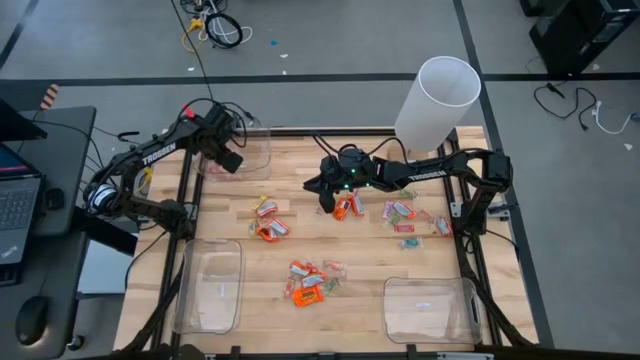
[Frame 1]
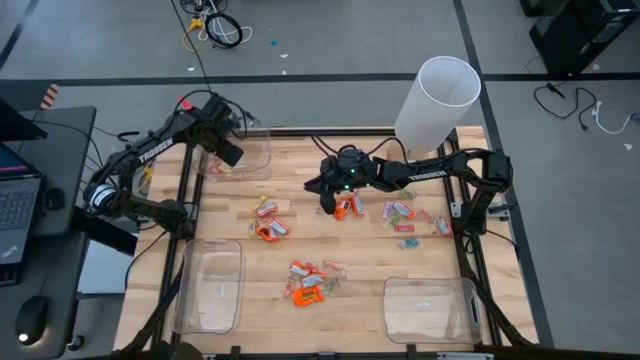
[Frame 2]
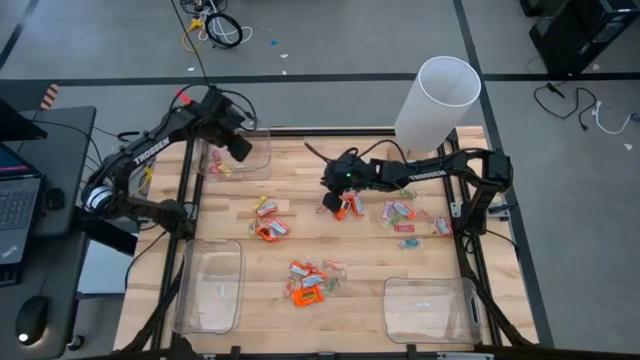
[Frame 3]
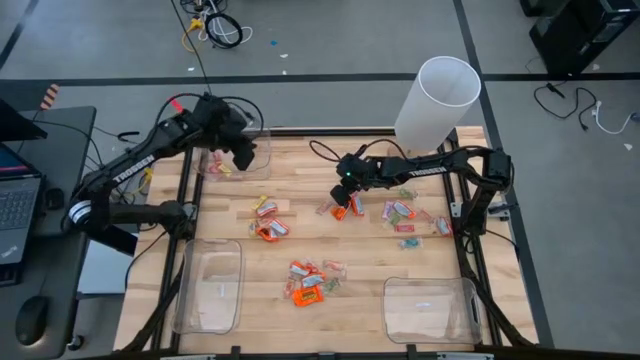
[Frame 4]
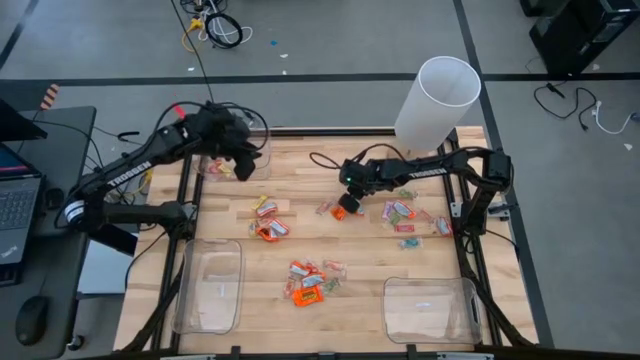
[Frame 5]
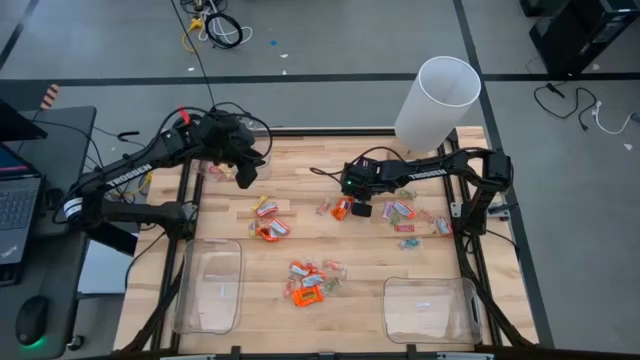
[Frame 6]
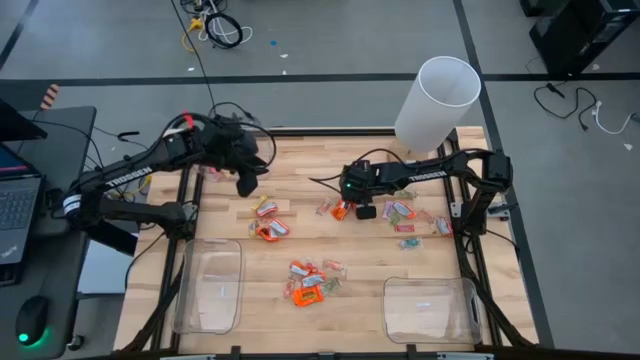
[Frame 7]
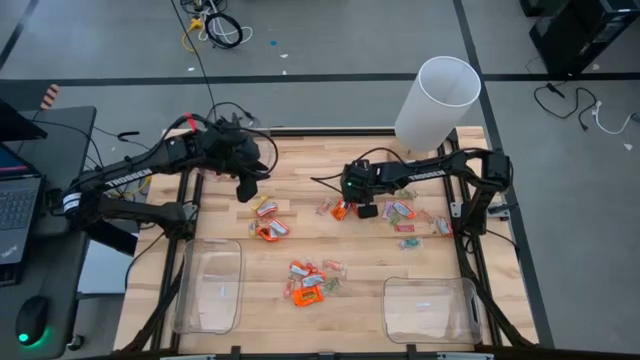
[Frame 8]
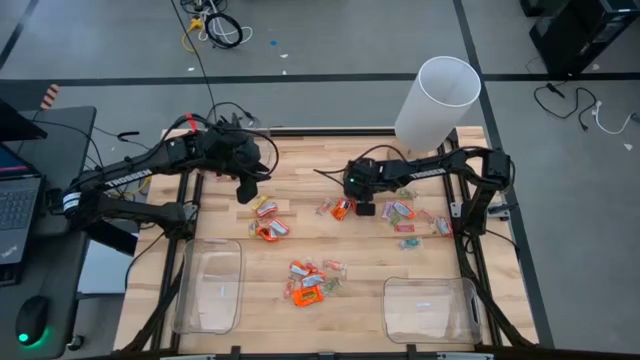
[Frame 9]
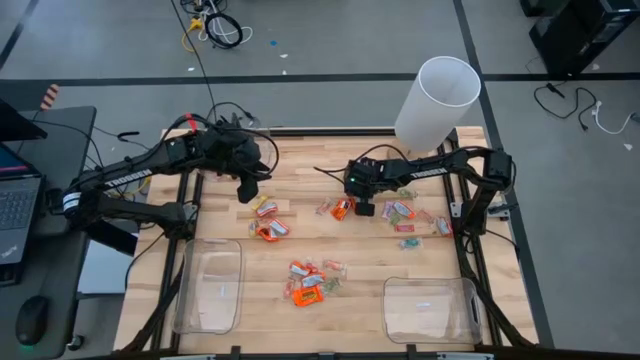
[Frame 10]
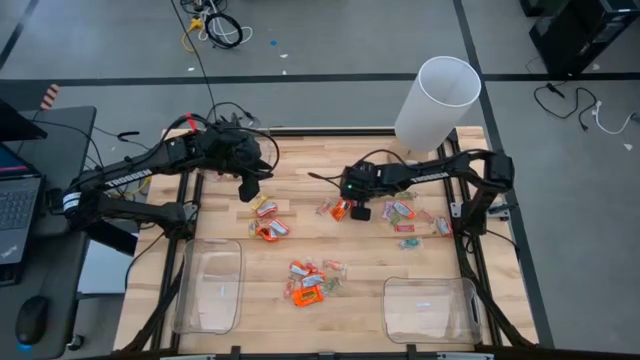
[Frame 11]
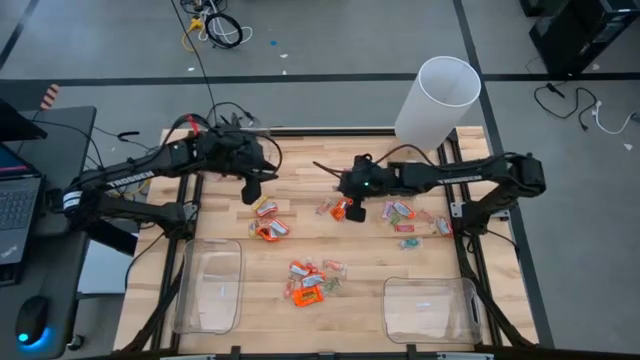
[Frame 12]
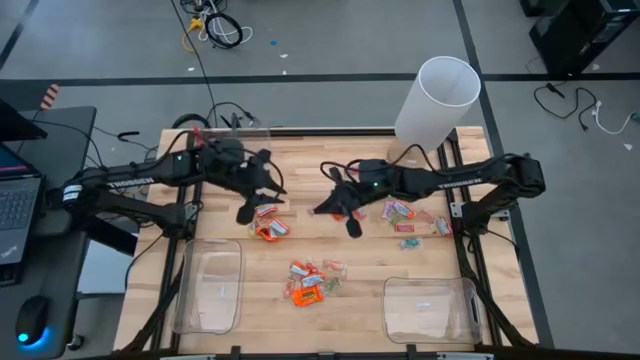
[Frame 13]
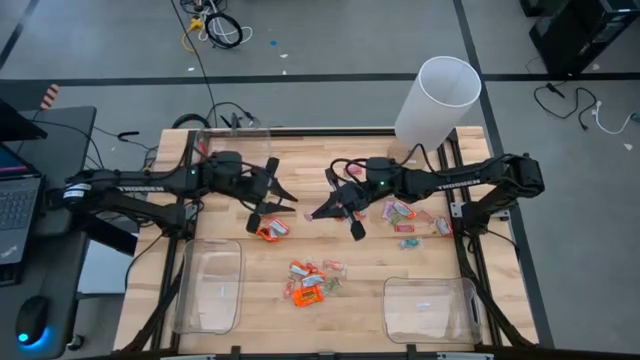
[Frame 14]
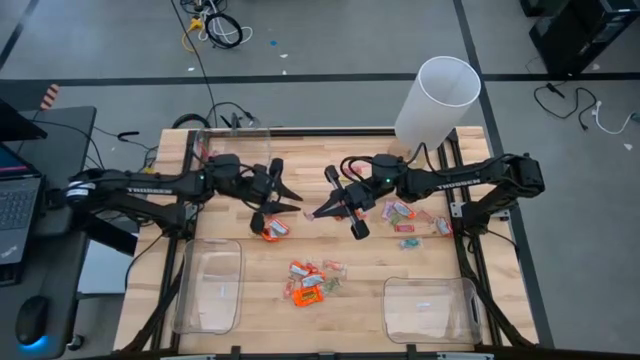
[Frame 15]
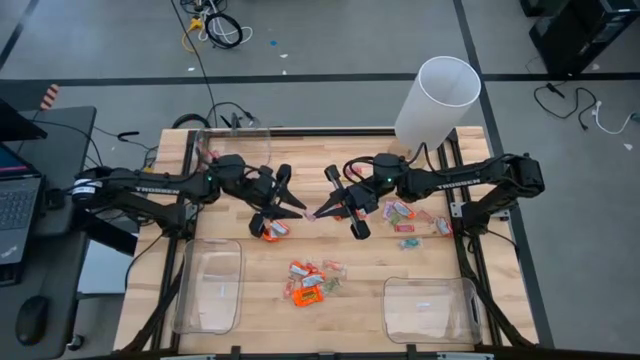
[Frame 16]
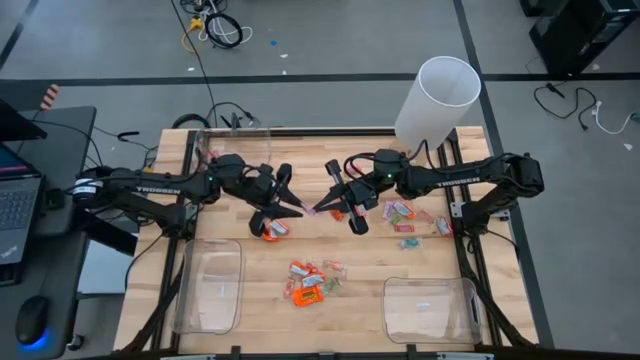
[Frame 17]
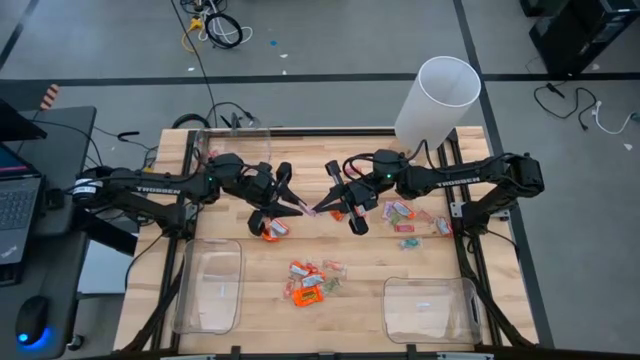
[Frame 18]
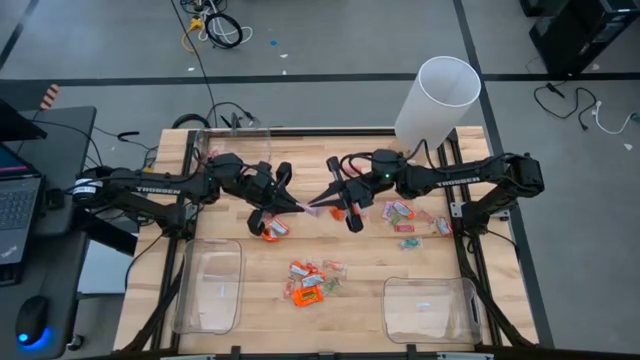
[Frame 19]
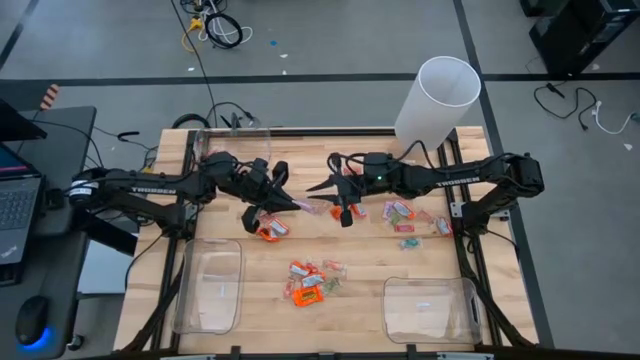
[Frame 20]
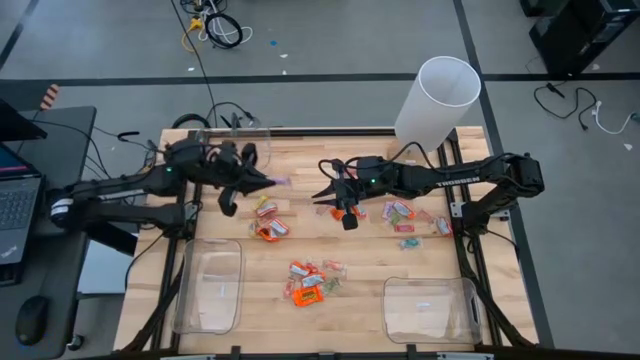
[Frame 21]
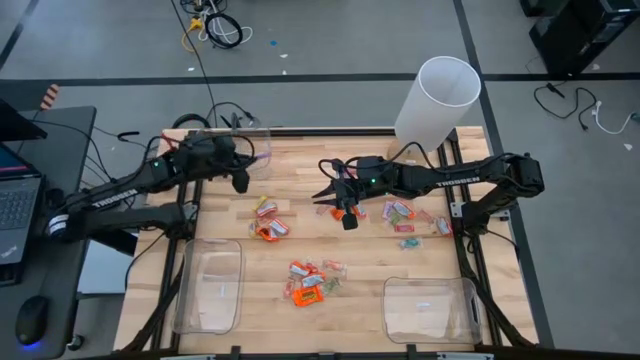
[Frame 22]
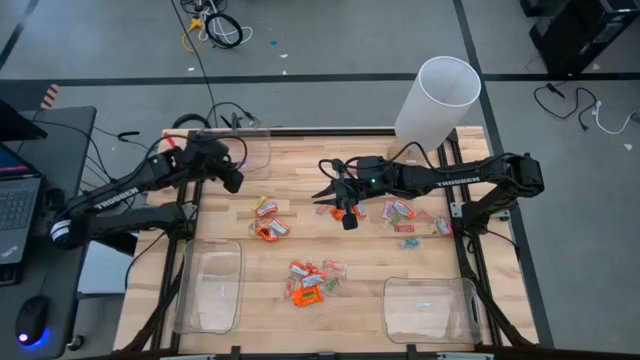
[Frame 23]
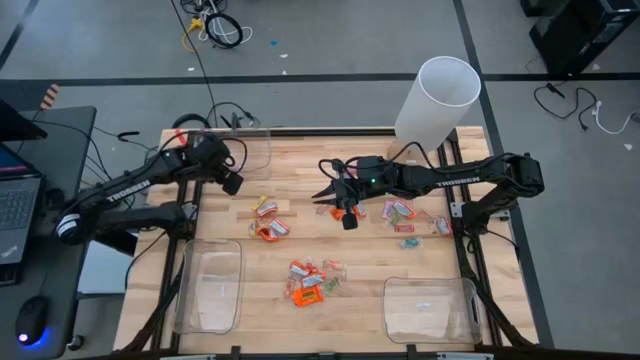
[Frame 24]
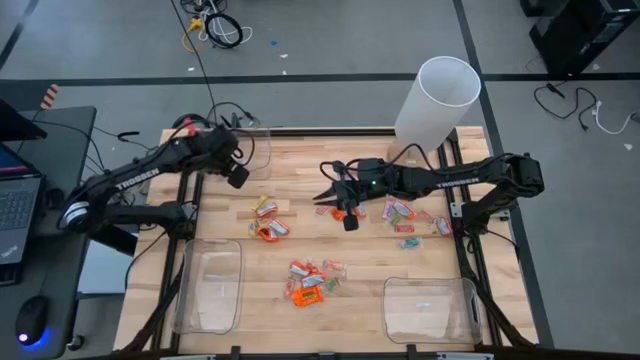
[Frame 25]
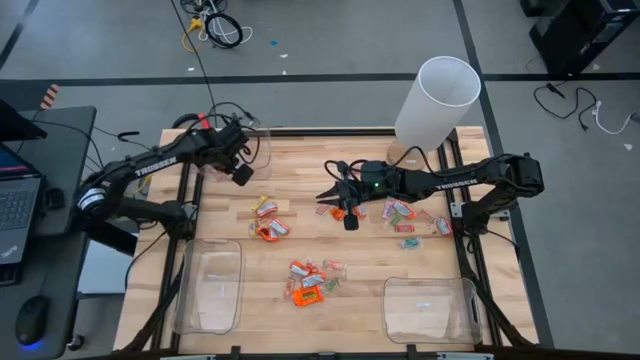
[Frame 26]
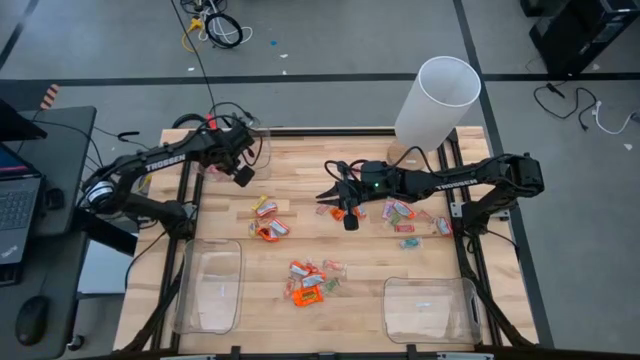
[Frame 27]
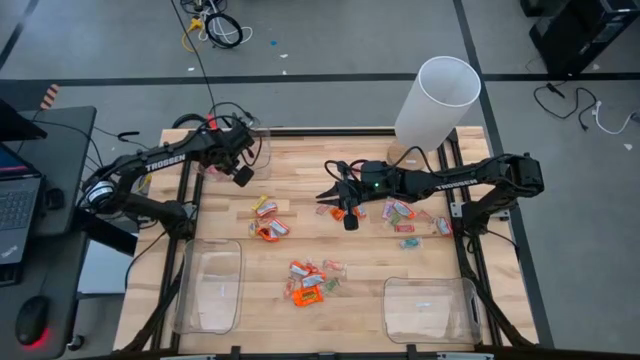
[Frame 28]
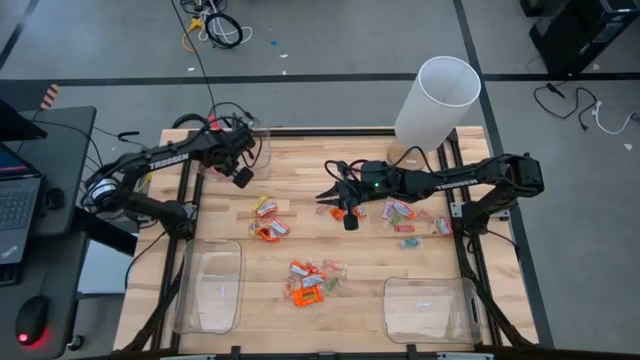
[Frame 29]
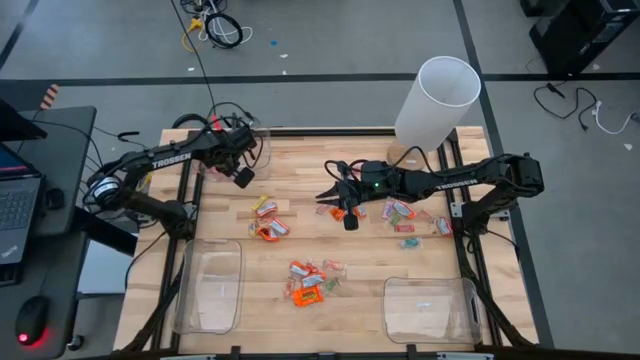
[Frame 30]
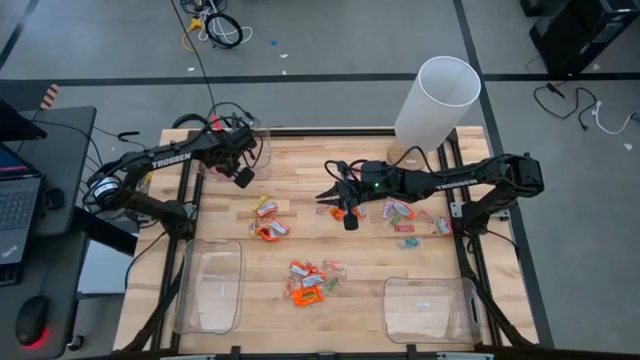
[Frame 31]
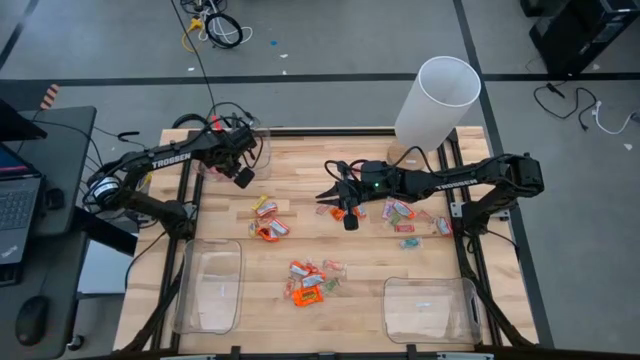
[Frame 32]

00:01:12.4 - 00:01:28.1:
Task: Sort candy
Put the pink candy into the top left transparent bin

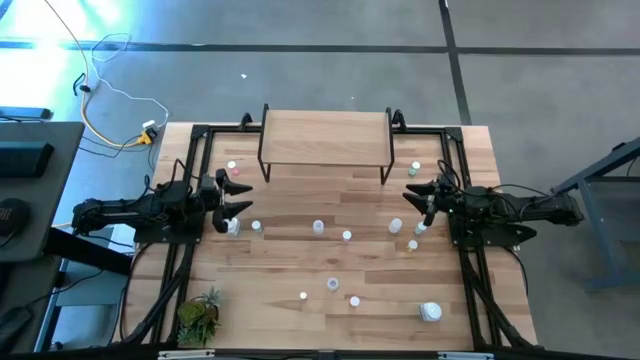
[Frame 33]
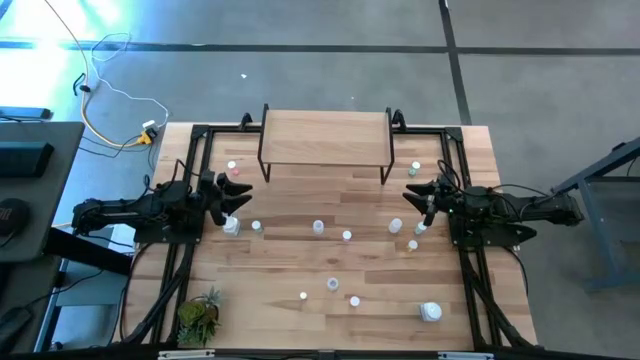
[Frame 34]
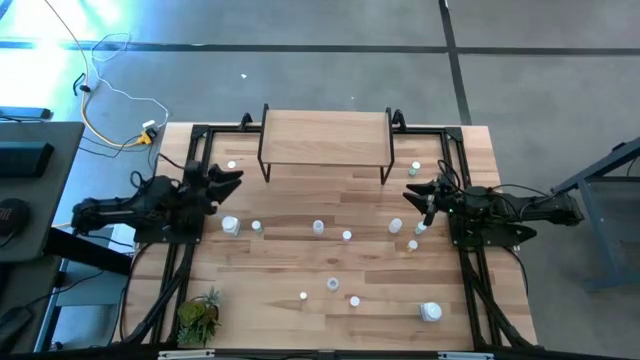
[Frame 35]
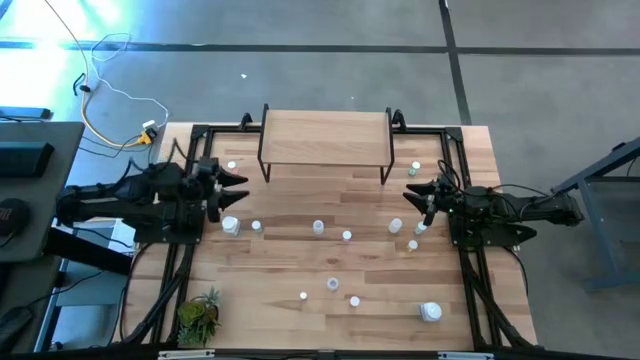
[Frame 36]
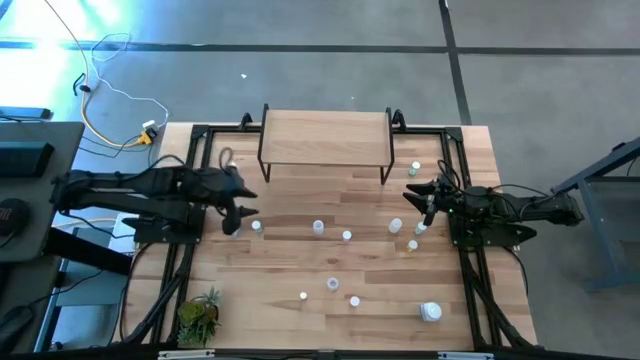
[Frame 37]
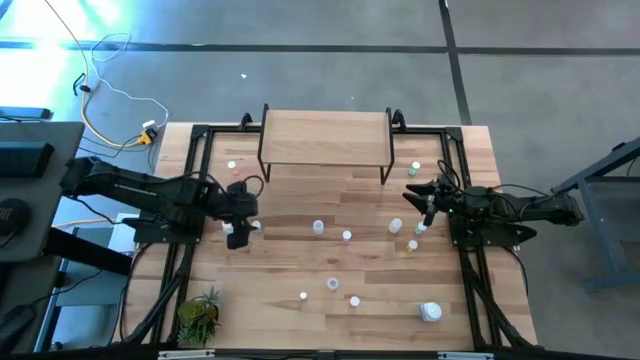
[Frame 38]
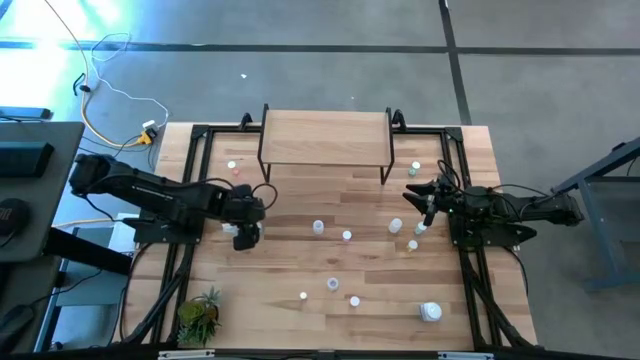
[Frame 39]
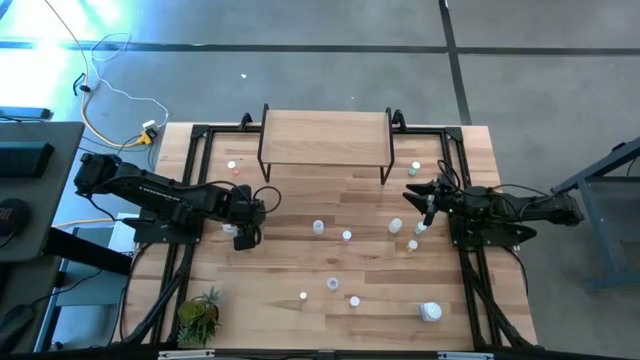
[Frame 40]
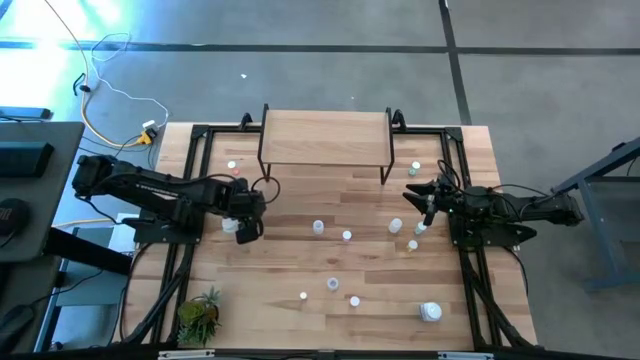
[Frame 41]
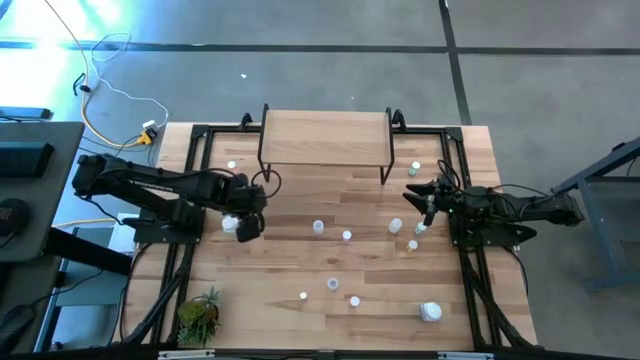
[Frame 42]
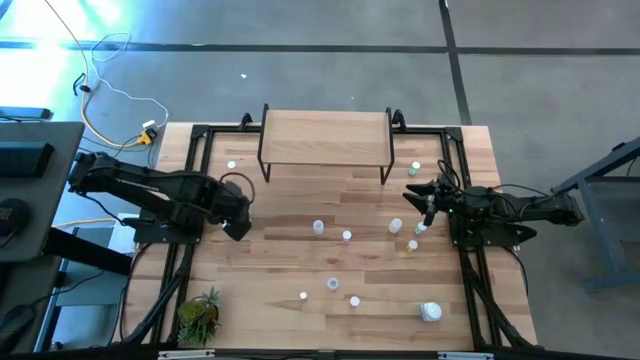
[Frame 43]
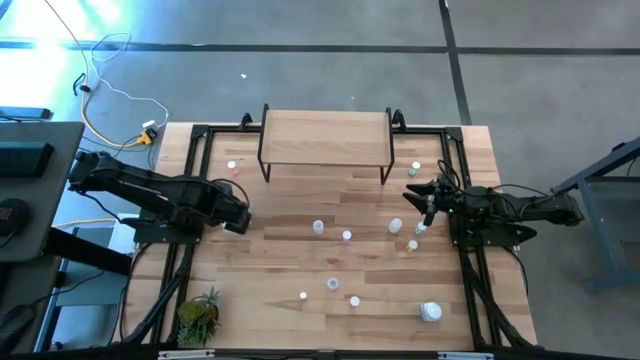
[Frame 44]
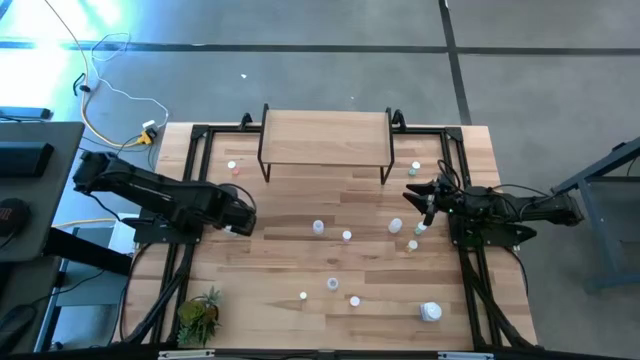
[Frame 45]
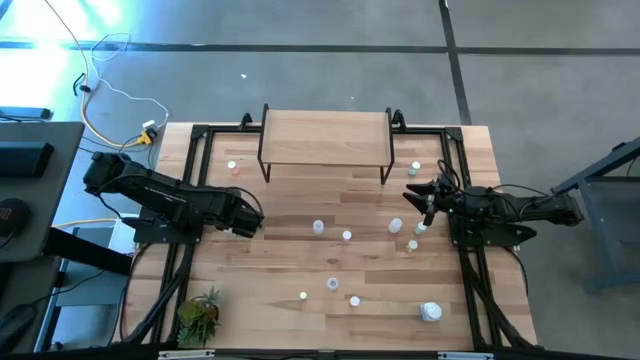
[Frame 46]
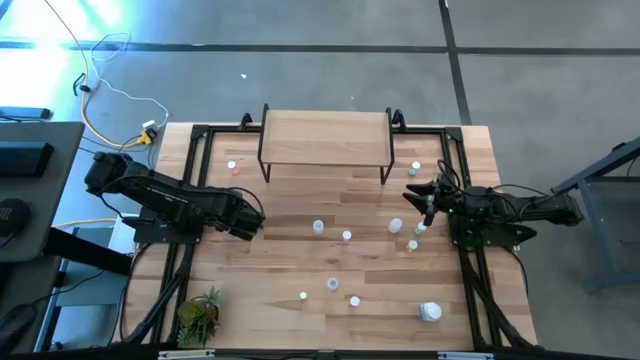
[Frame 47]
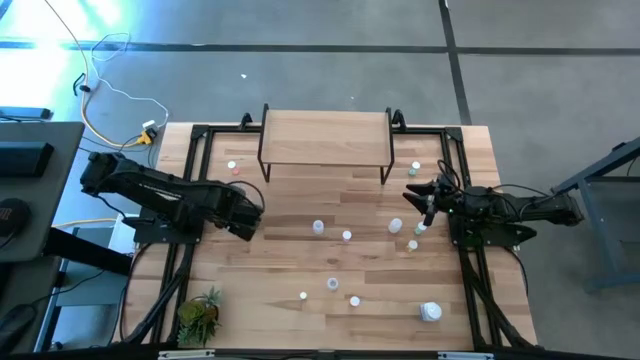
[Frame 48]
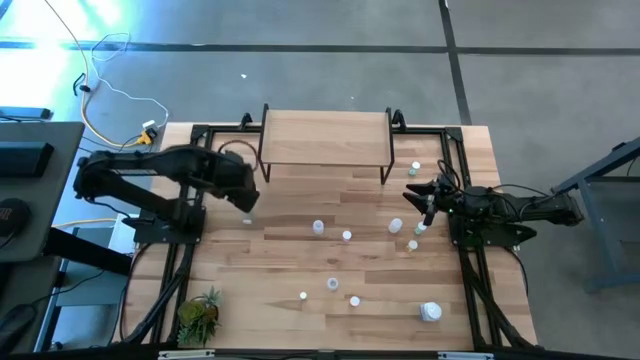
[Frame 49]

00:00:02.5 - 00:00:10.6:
Task: Pick and place medicine bottles onto shelf by color
Put the white pill bottle on the shelf
